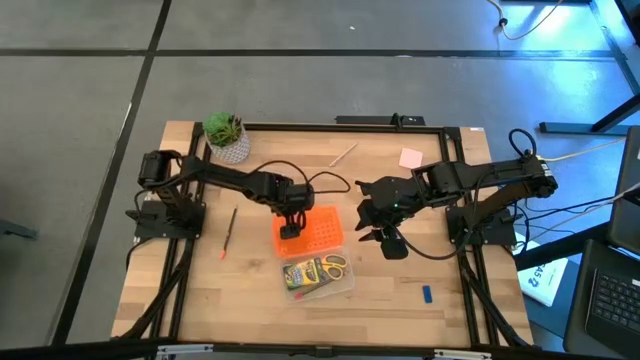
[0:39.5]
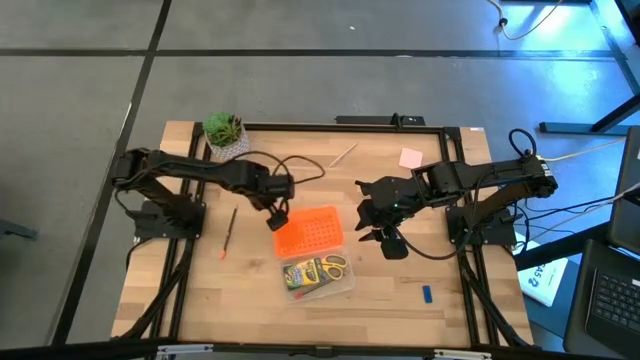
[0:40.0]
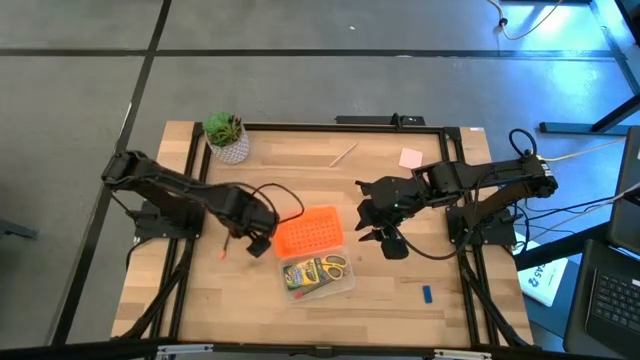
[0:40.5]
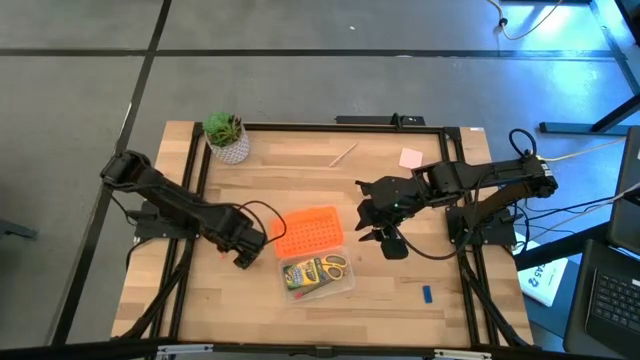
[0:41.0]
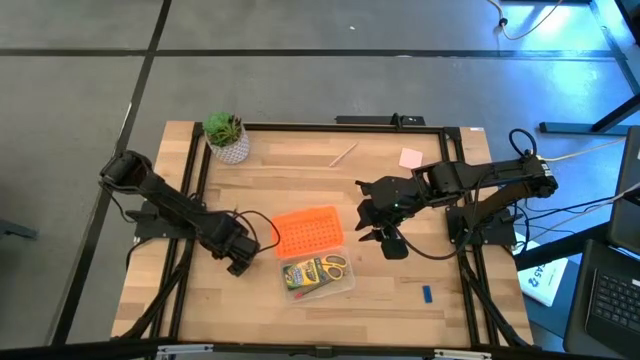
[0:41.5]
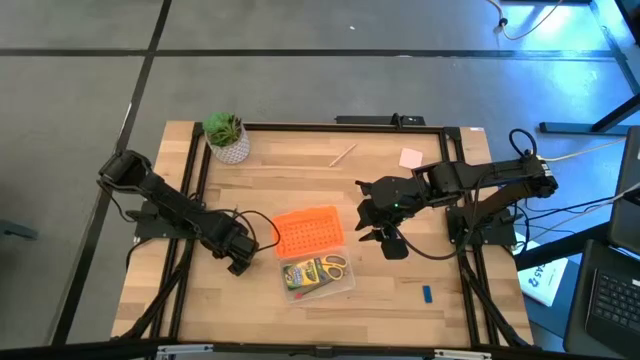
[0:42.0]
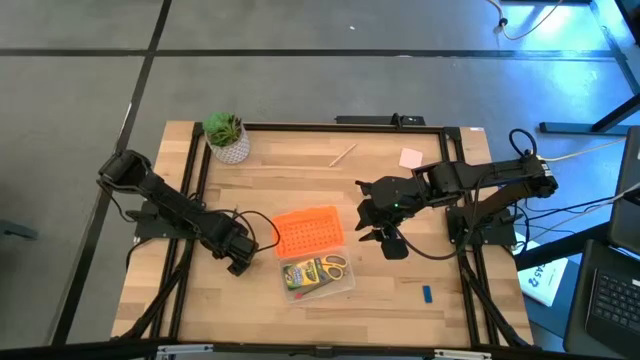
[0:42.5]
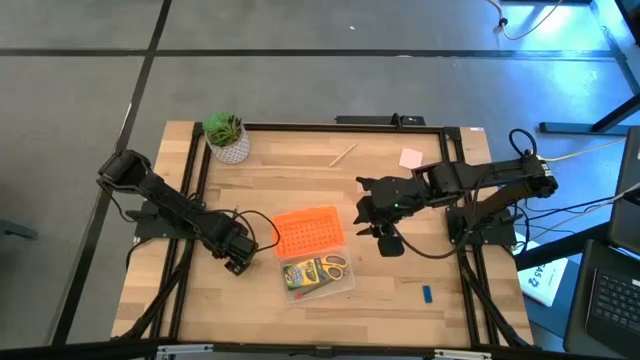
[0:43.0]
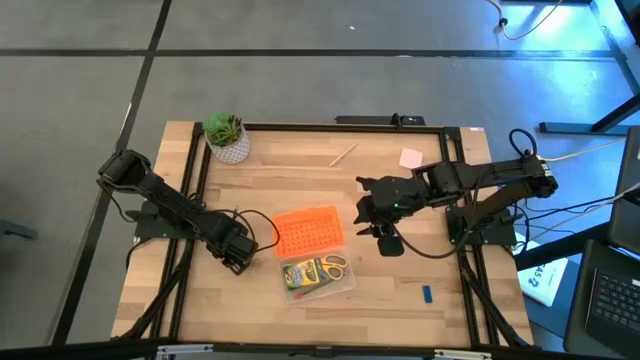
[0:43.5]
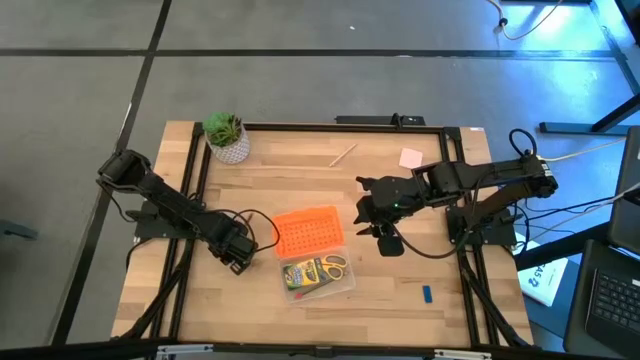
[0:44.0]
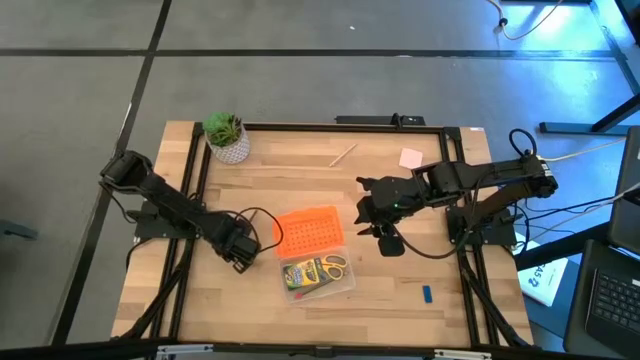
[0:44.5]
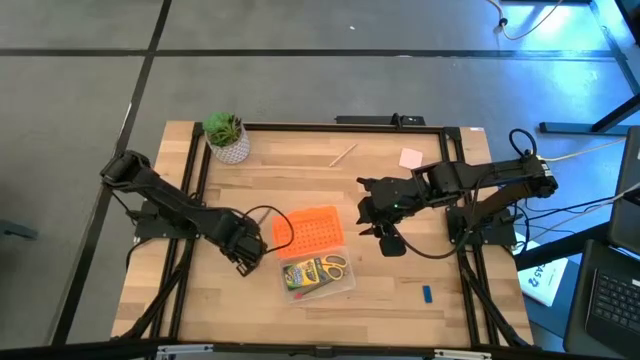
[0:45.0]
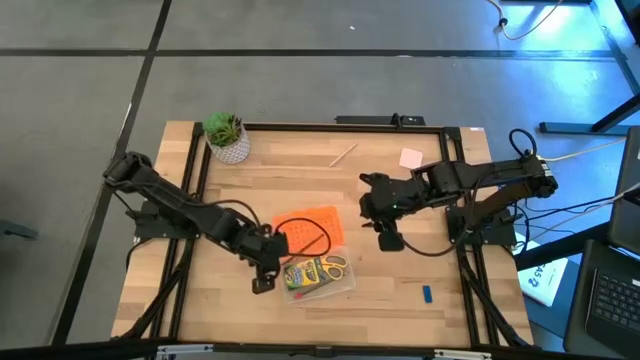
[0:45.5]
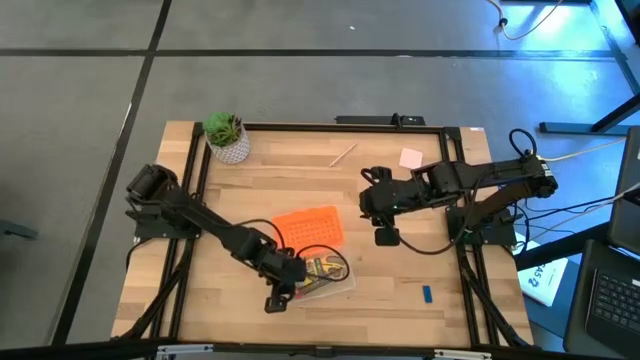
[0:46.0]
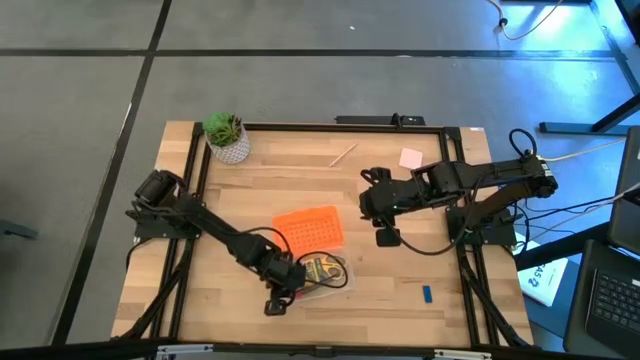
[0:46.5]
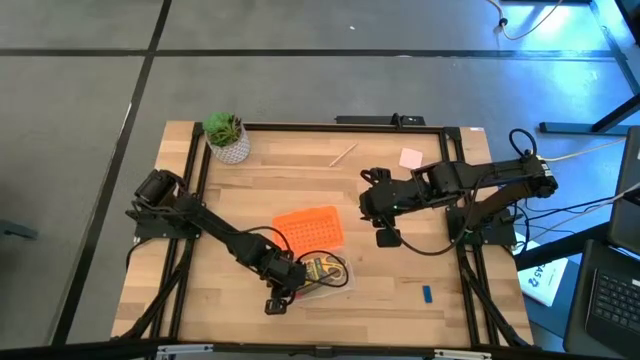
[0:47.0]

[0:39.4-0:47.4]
Task: Pack school essentials
Put the black pencil into the orange supply box

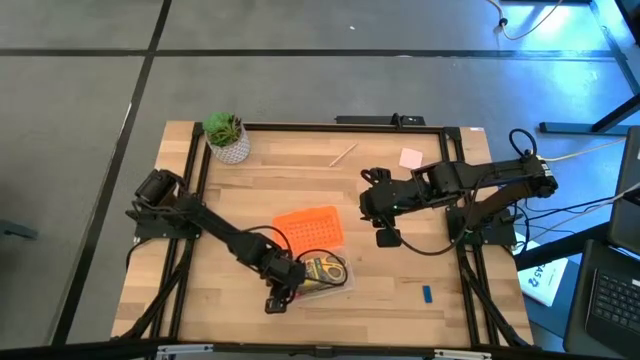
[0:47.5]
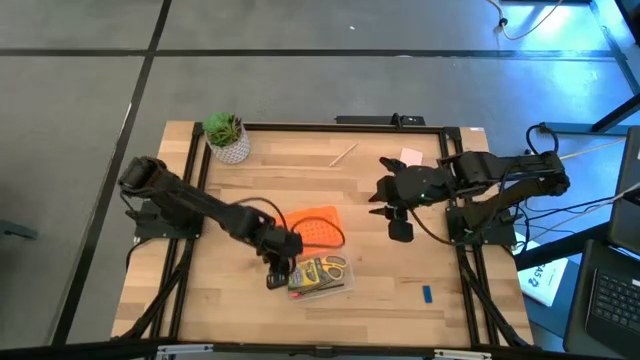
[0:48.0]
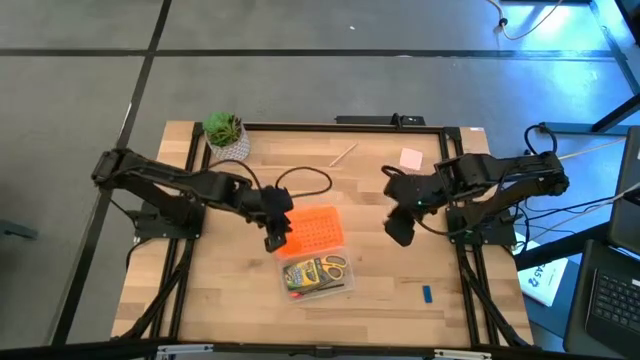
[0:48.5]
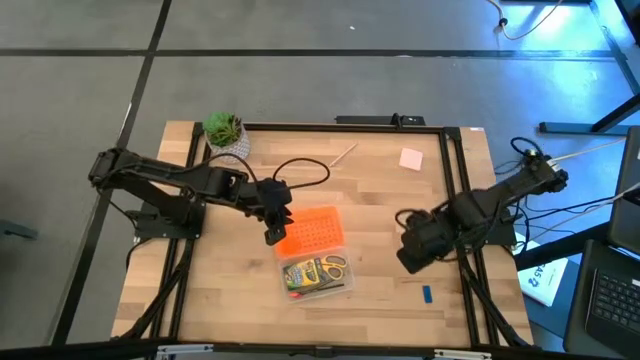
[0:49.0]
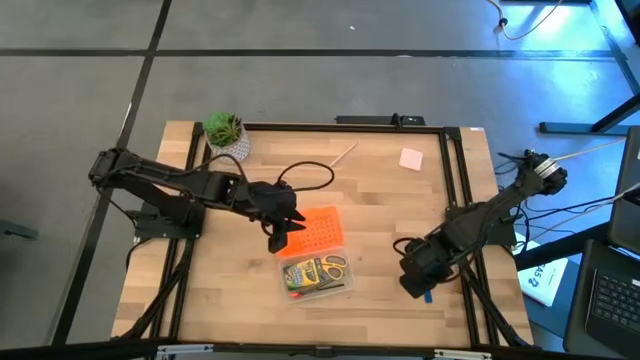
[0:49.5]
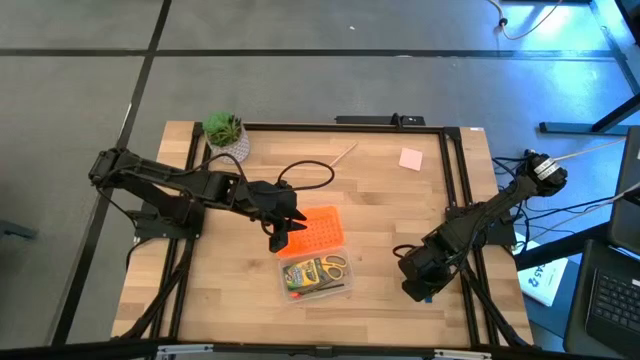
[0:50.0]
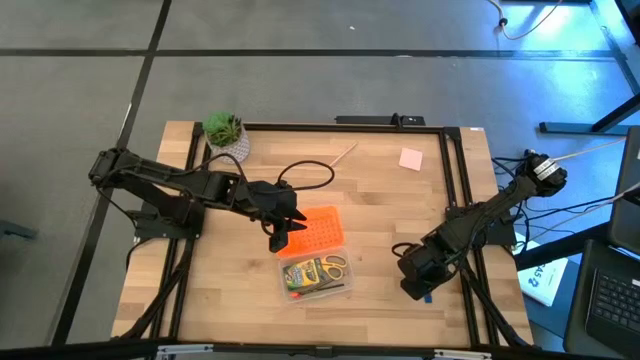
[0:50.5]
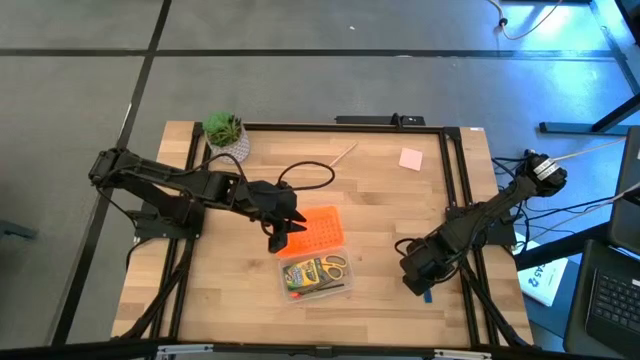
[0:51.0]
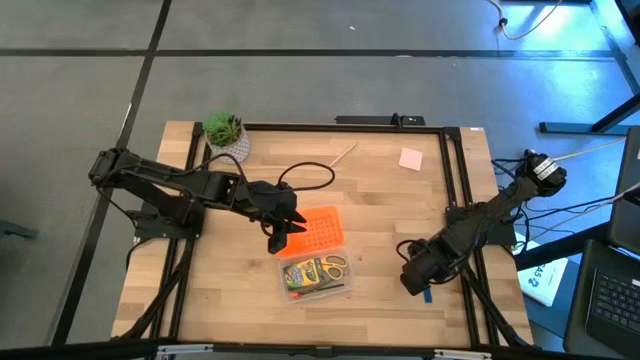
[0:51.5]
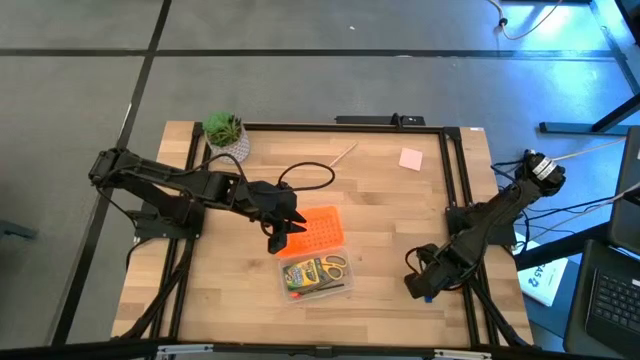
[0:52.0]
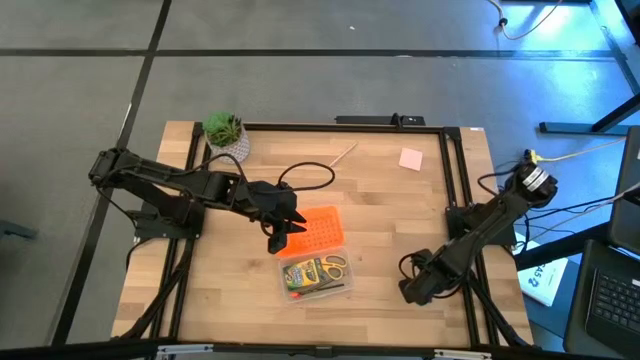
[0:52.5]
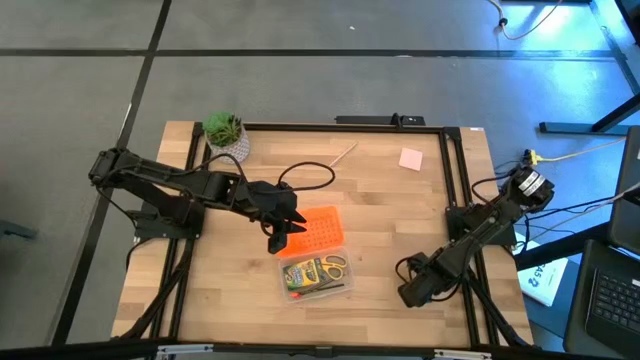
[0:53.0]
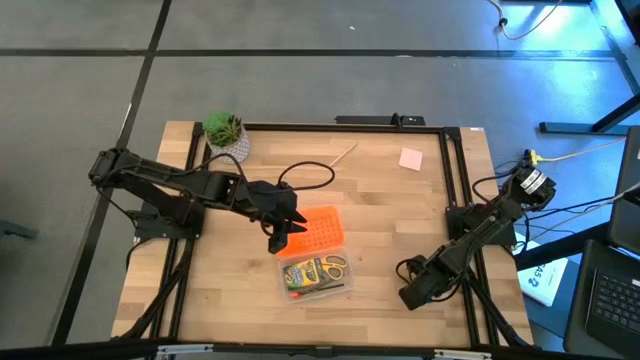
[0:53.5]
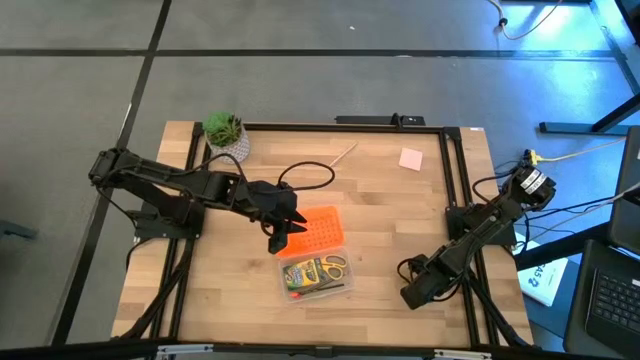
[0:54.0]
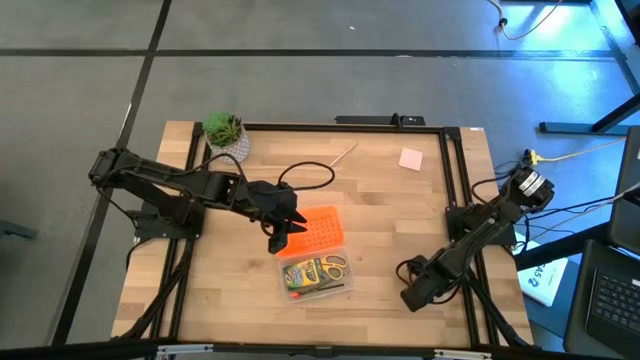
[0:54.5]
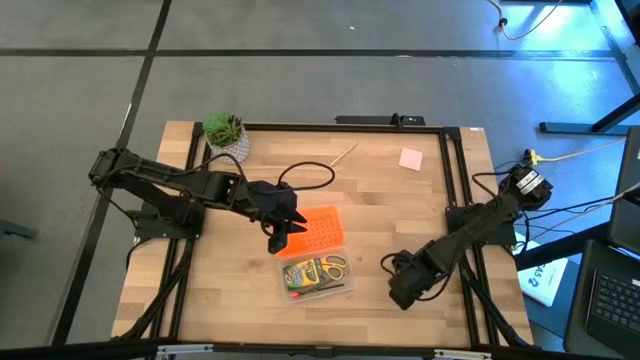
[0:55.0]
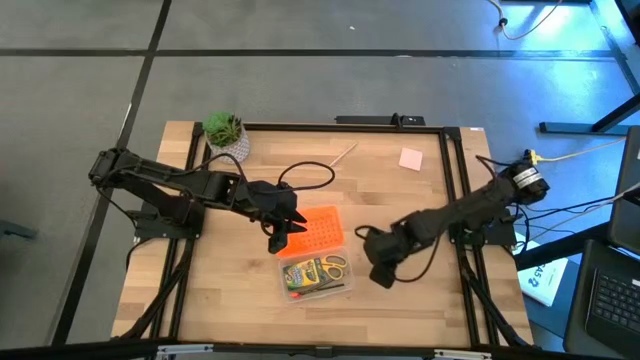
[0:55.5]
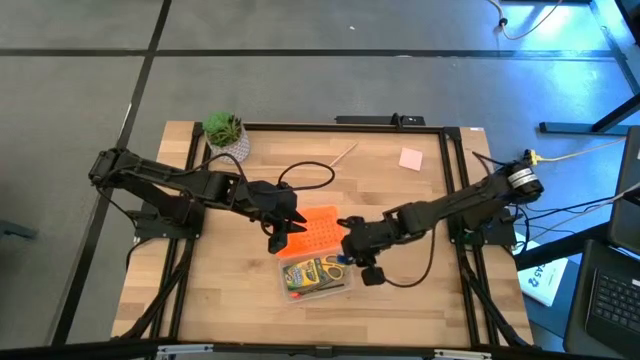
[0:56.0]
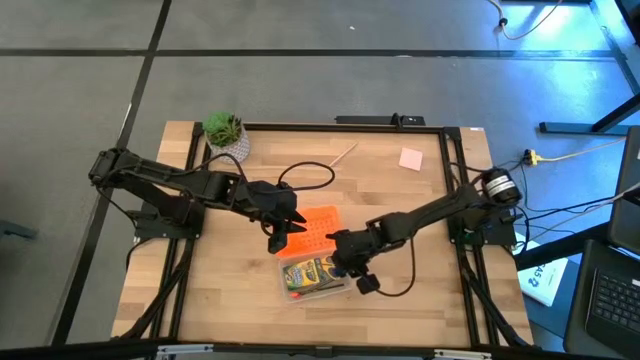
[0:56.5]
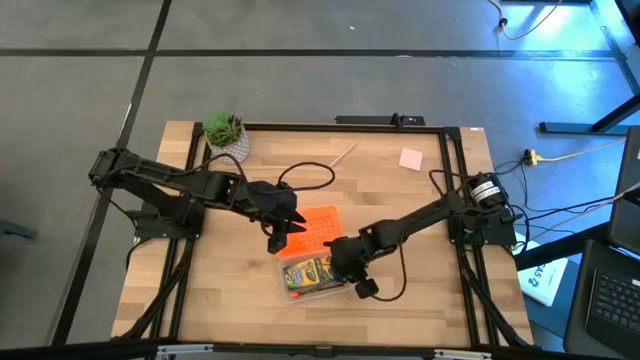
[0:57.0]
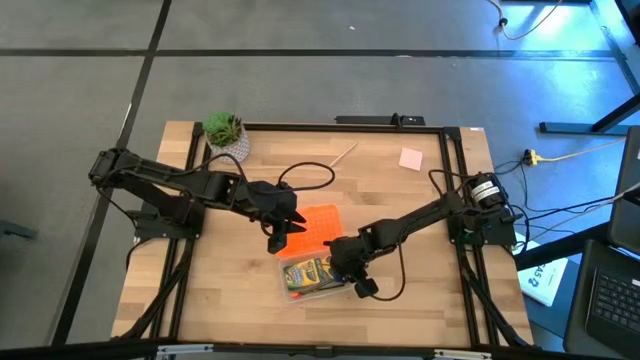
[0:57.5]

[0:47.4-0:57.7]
Put the blue eraser into the orange supply box

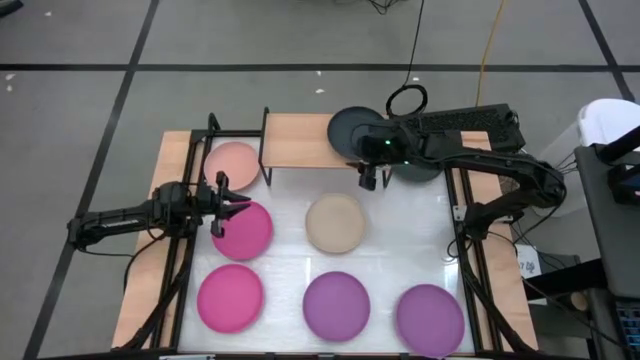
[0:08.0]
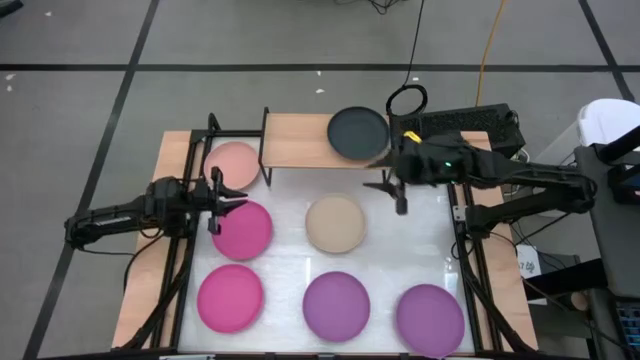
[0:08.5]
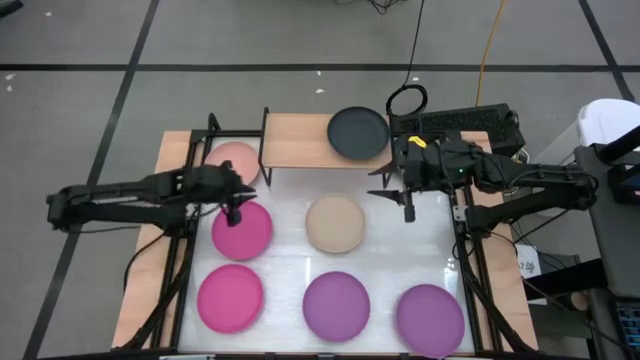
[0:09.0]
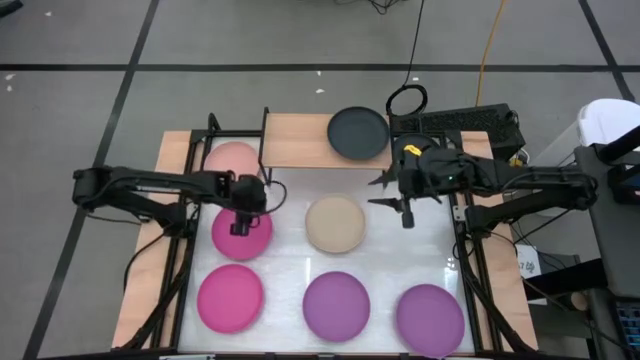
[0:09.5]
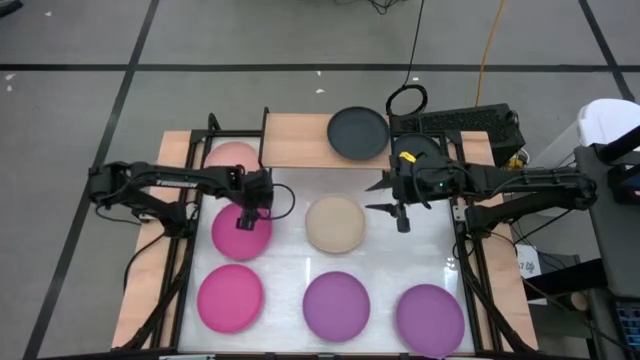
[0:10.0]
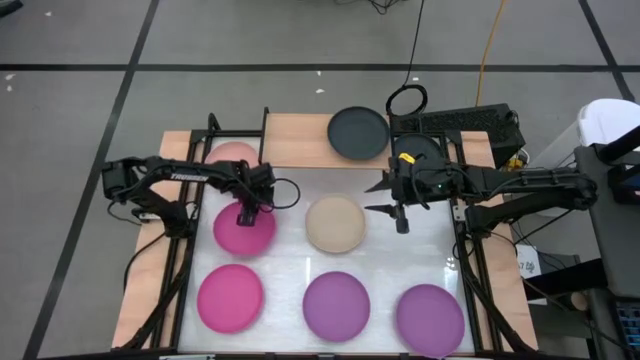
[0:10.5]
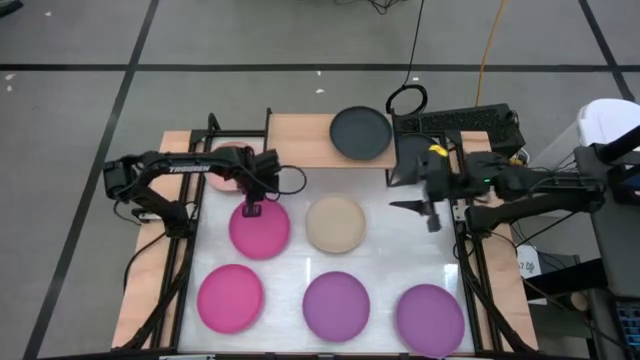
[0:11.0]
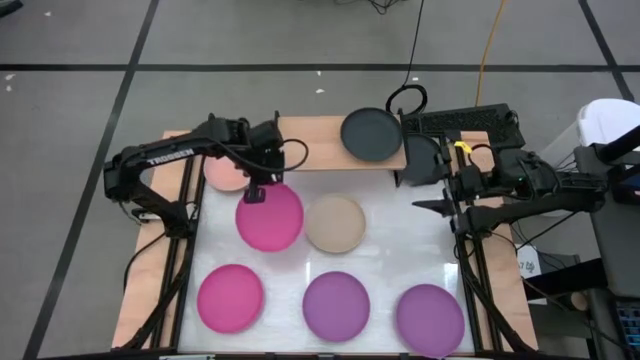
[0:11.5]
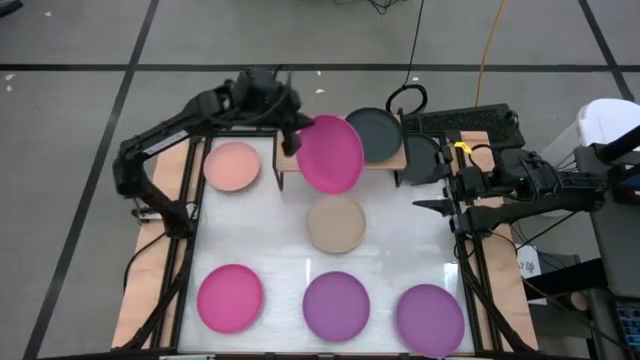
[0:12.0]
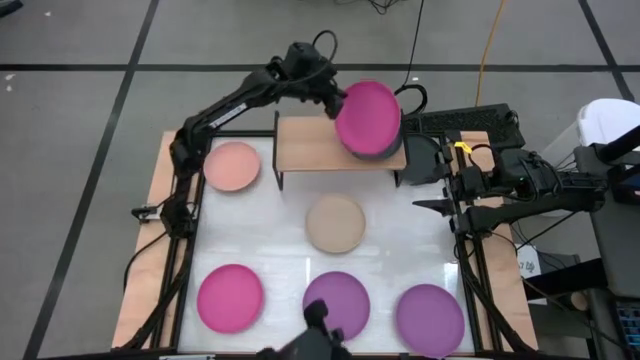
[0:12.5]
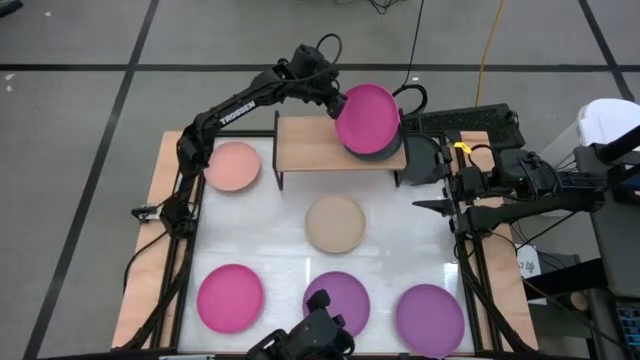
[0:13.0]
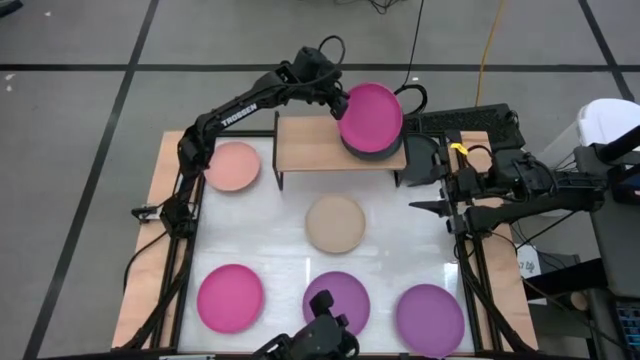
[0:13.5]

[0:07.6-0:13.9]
Task: Place and stack plates onto a shelf
Stack the top pink plate on the black plate on the shelf
